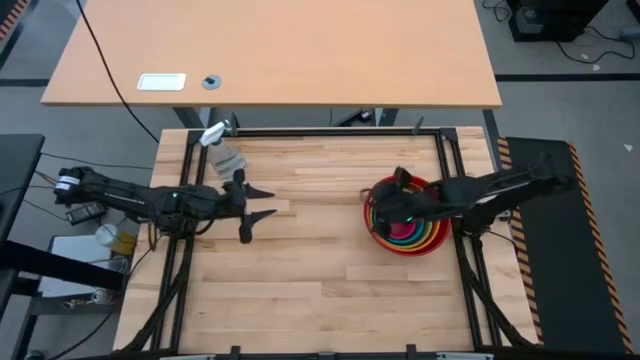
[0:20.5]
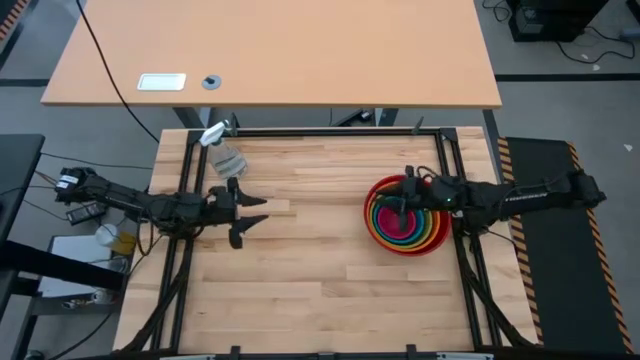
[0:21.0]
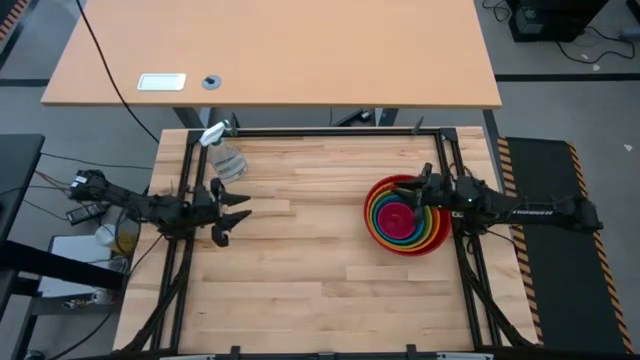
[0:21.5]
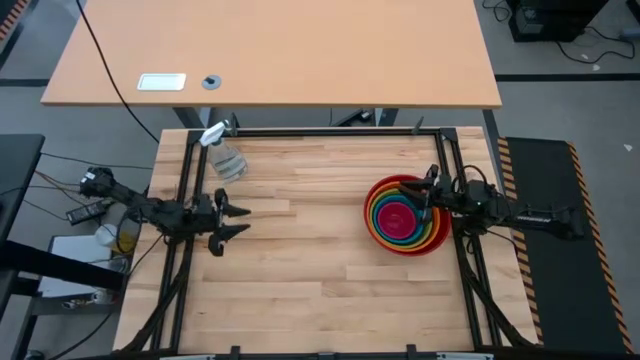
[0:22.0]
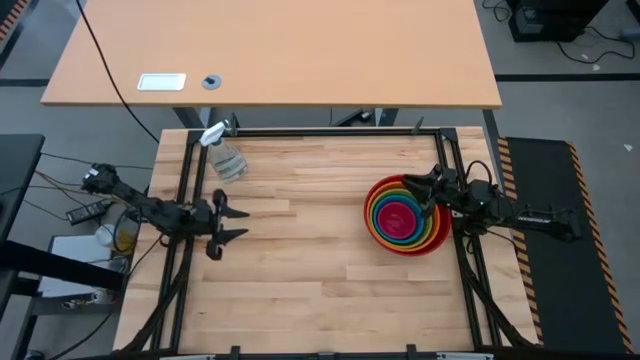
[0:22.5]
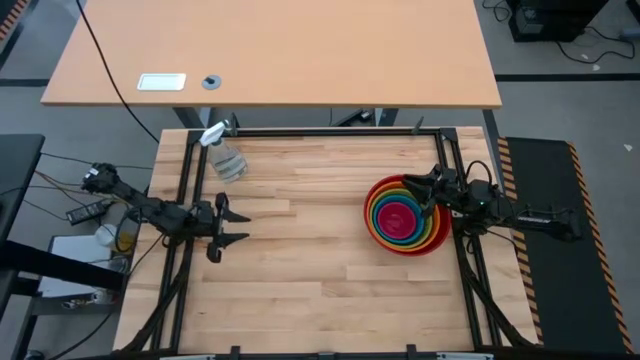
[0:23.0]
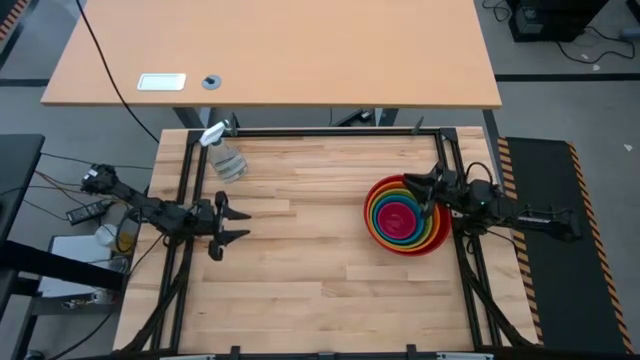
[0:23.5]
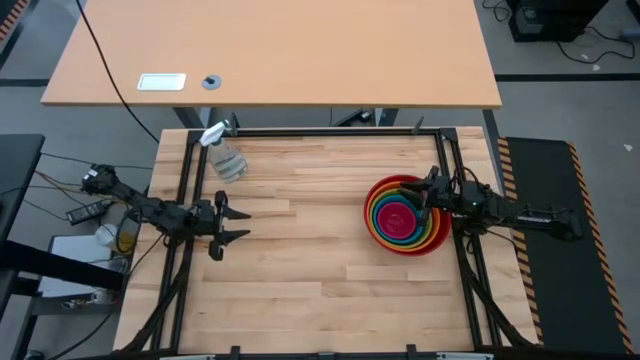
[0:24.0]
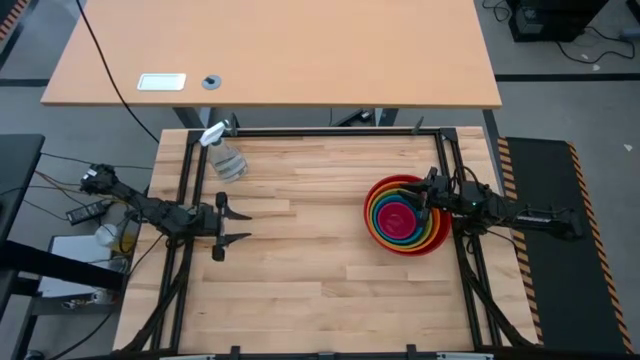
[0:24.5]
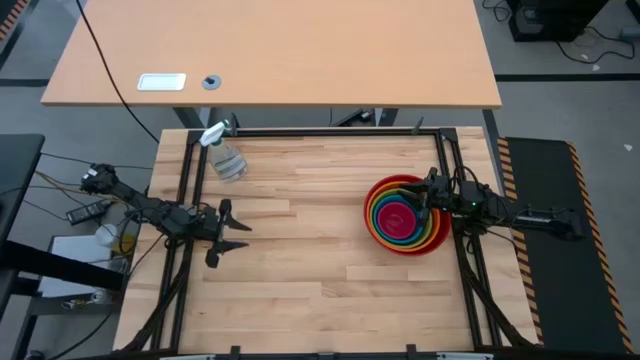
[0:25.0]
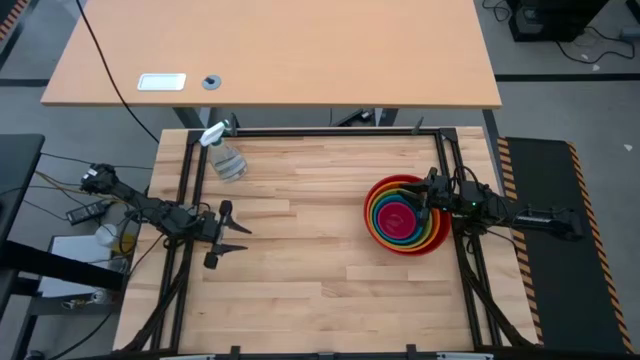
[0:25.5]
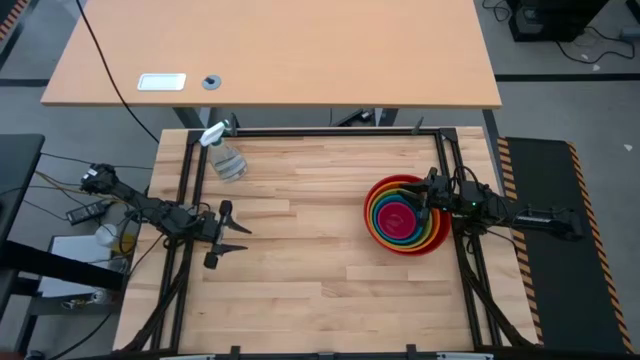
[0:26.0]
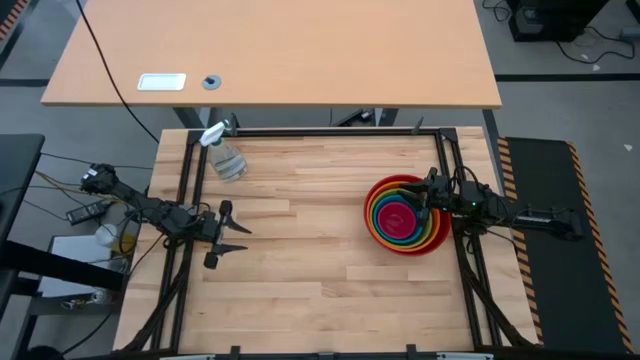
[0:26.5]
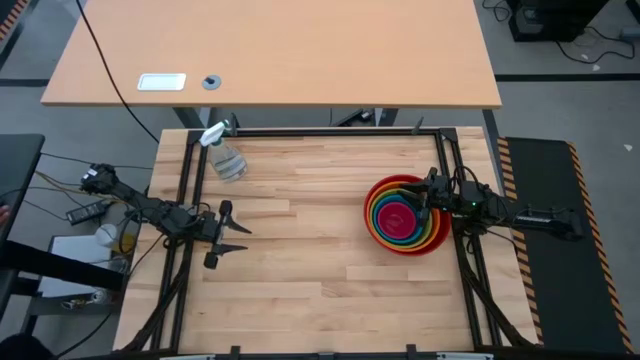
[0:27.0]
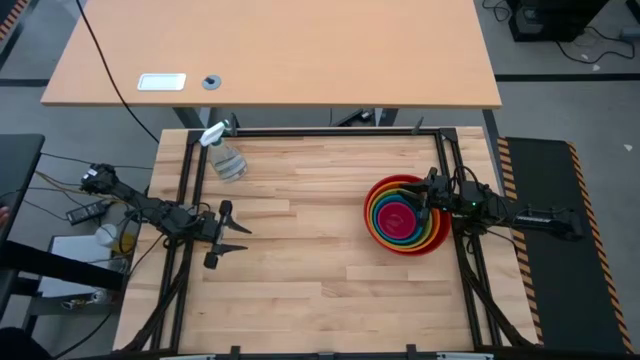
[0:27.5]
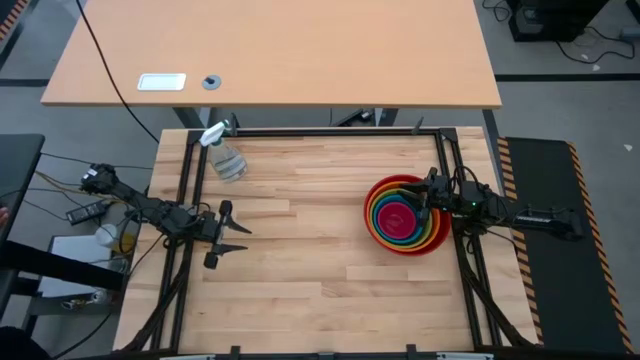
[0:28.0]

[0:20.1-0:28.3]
Return to Home Position

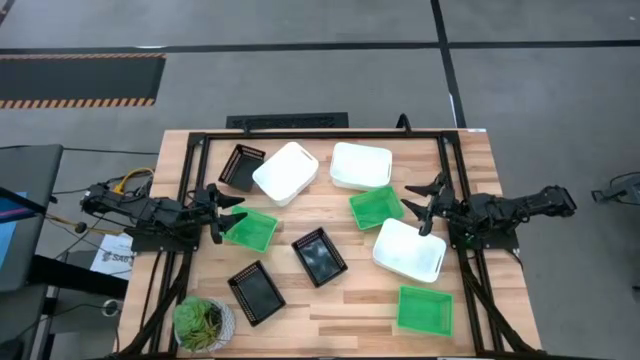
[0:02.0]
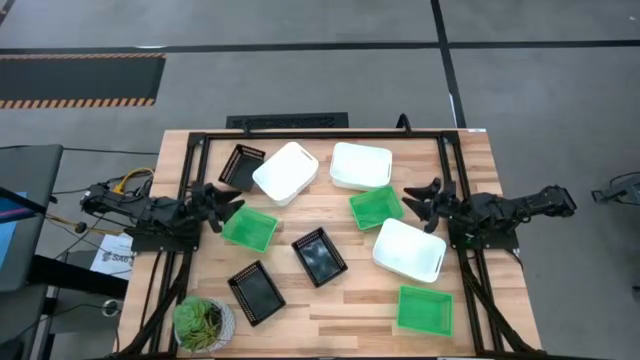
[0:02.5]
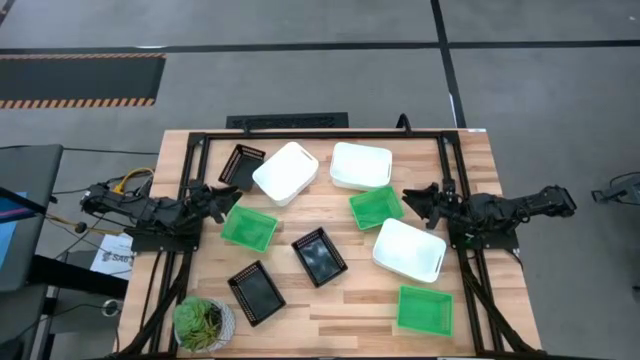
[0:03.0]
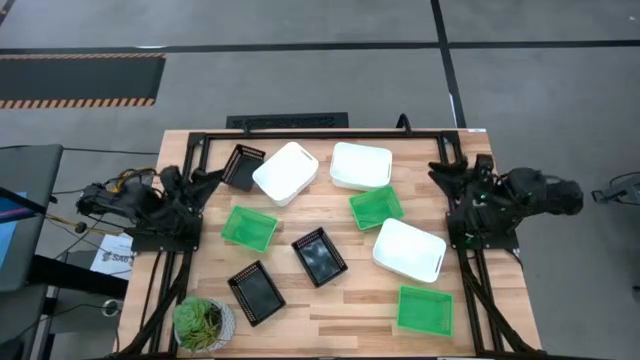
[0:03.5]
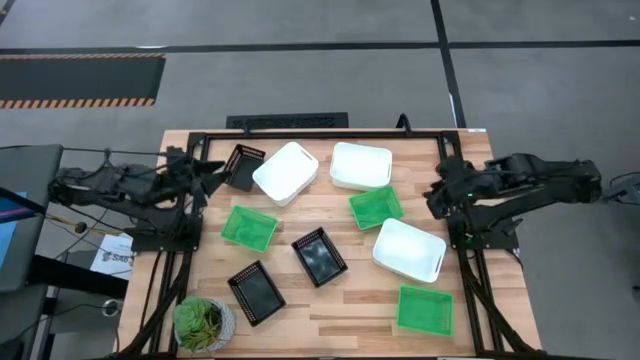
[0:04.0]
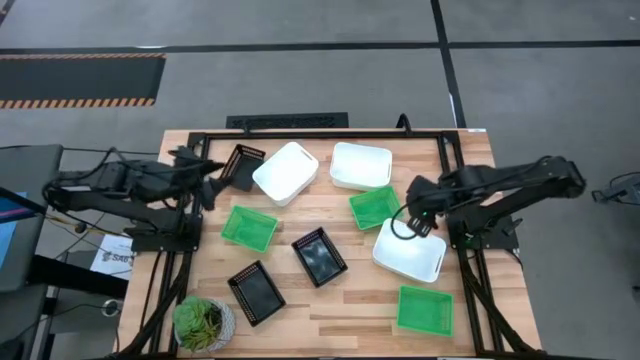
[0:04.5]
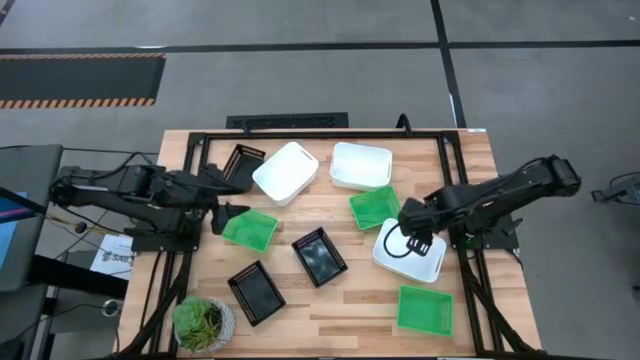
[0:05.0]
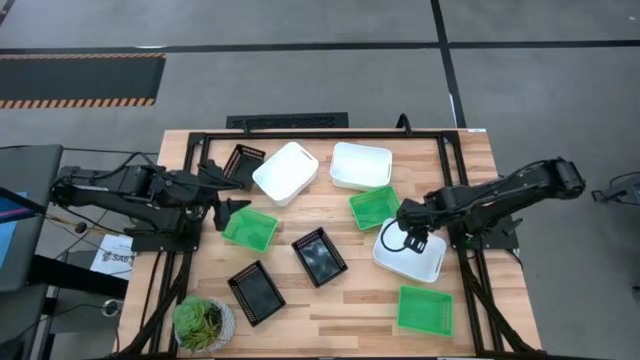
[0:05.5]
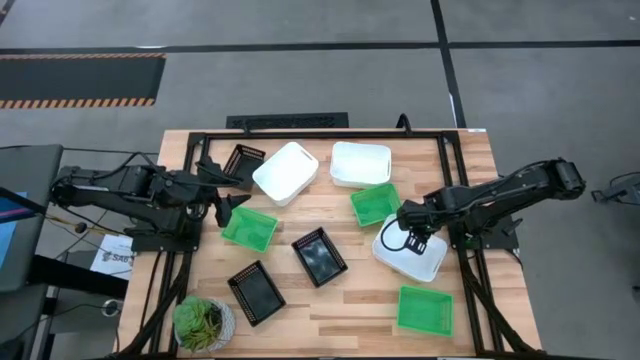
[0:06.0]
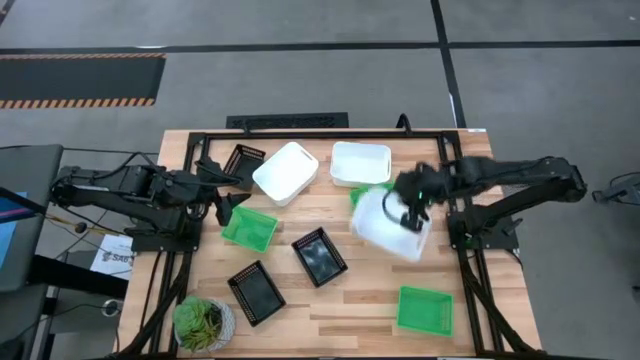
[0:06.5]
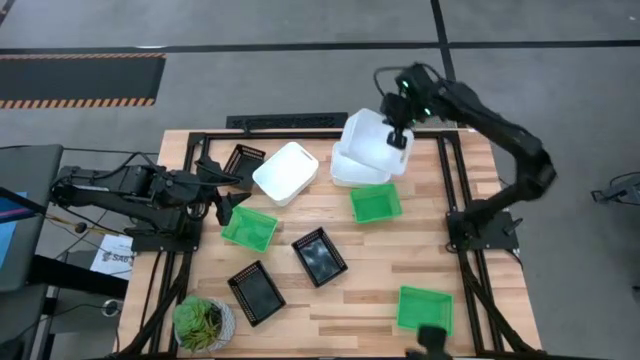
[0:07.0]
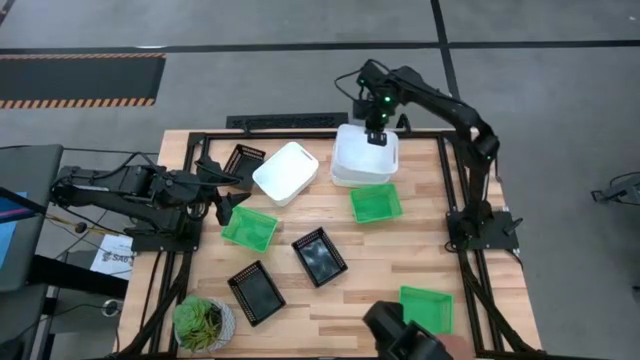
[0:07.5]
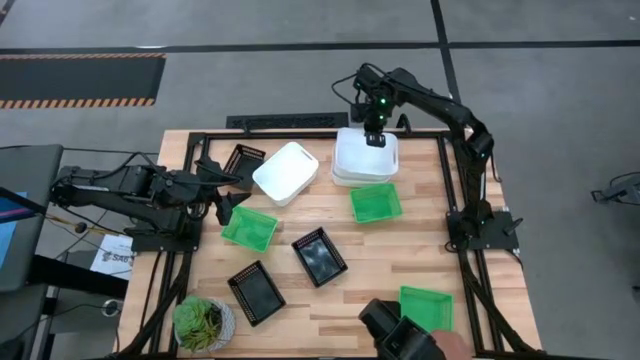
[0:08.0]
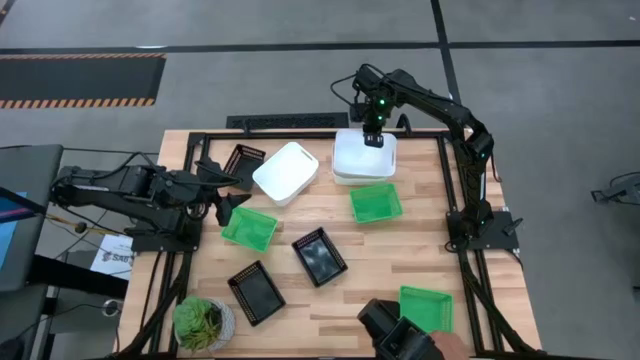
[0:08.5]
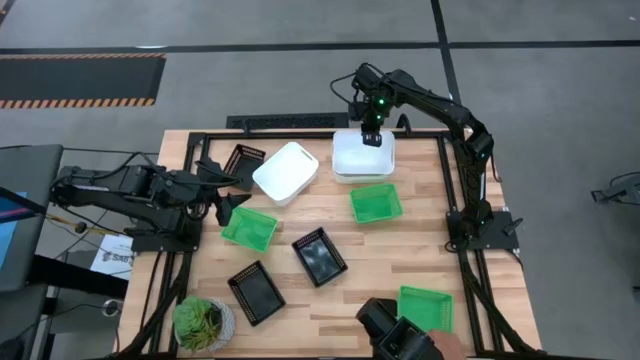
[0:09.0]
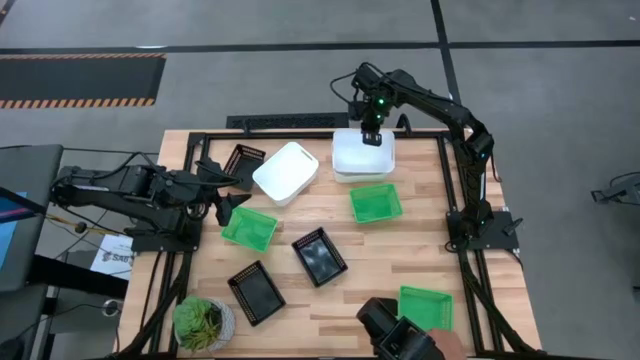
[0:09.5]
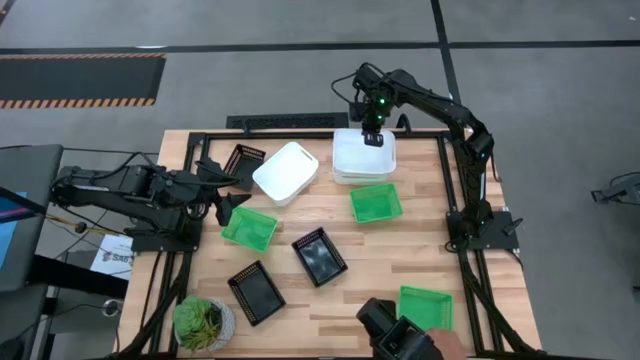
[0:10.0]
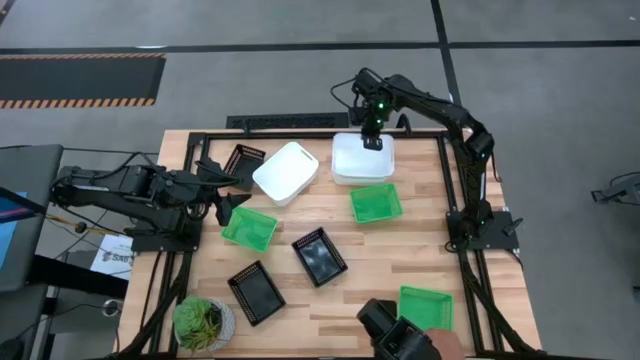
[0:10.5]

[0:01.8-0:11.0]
Stack the bottom white bin on the top right white bin

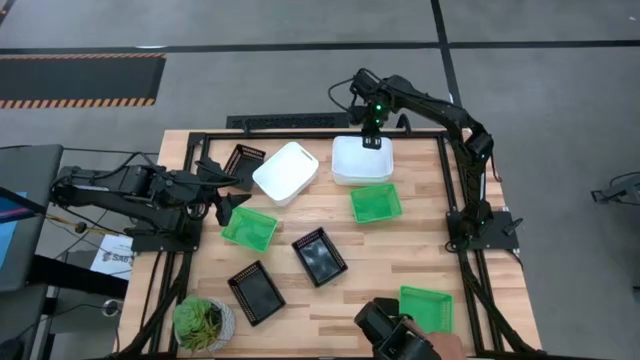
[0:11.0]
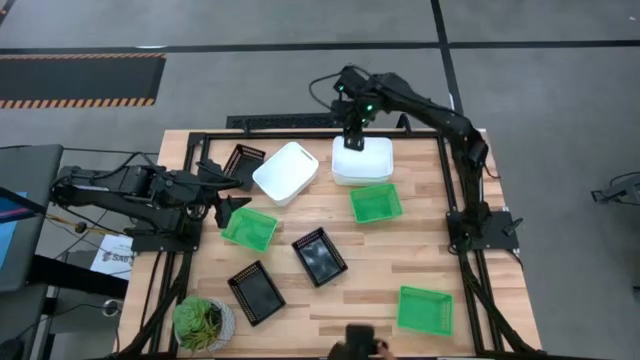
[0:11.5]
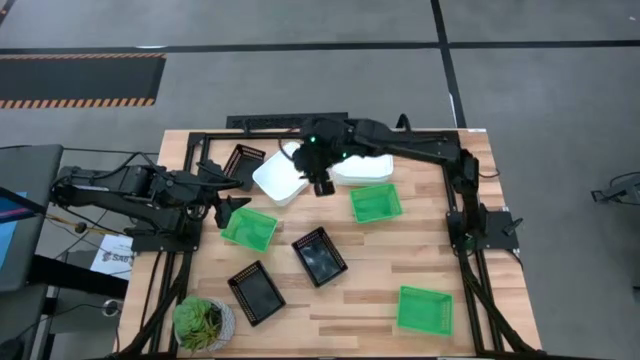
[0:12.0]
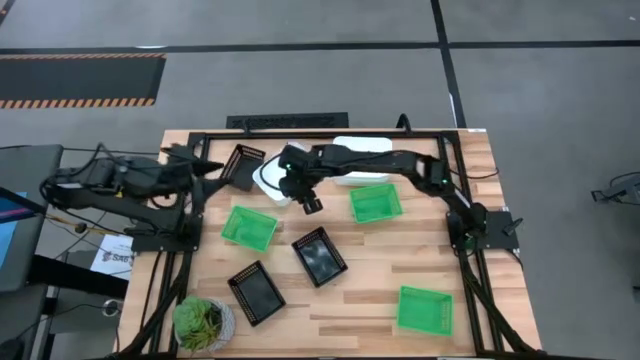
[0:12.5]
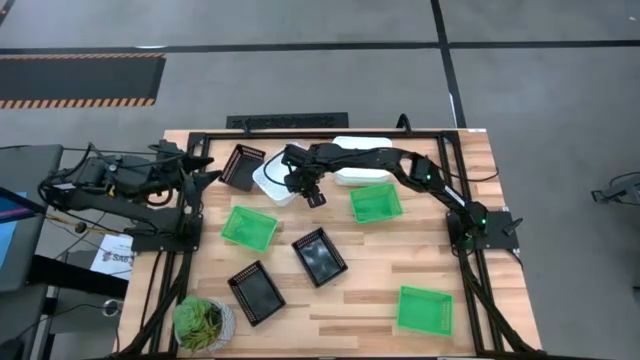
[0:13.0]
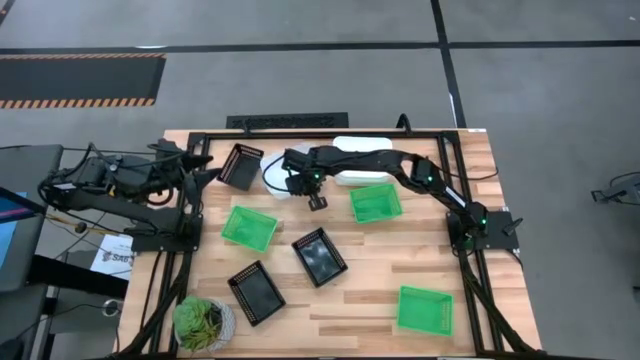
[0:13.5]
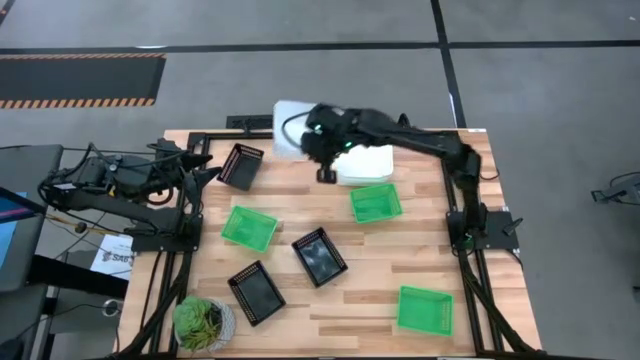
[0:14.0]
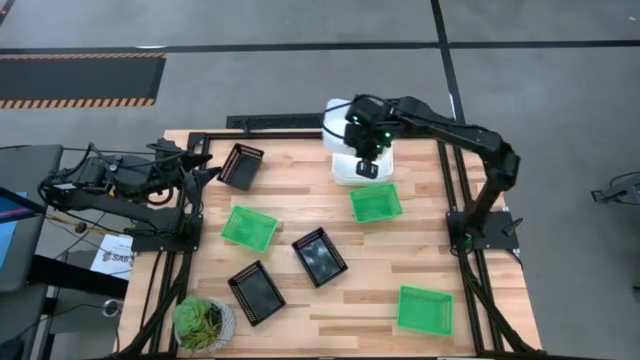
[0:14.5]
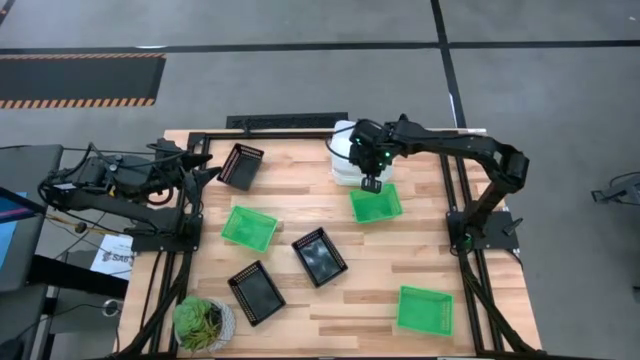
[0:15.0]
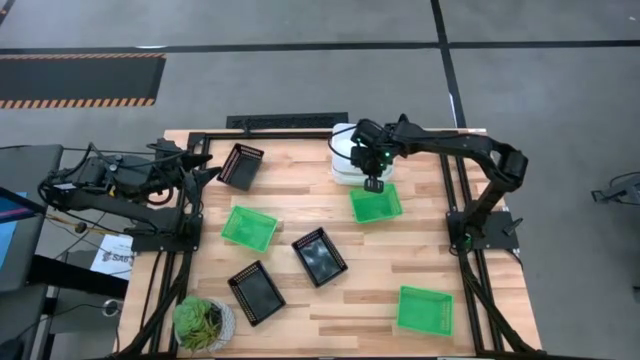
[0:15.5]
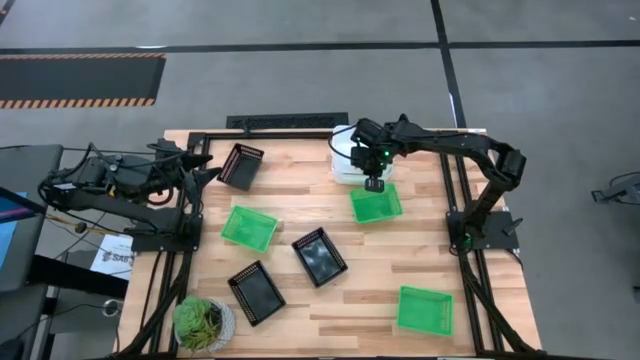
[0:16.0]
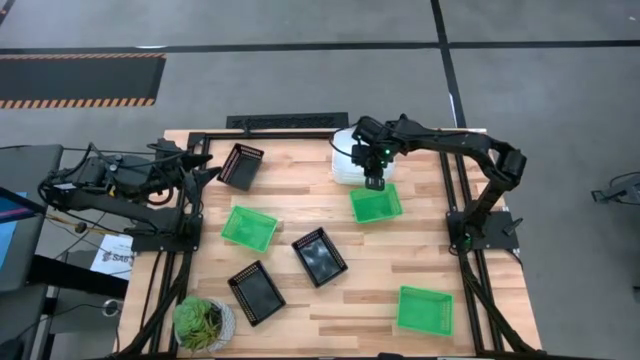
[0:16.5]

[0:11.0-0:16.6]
Stack the white bin on the white bin
